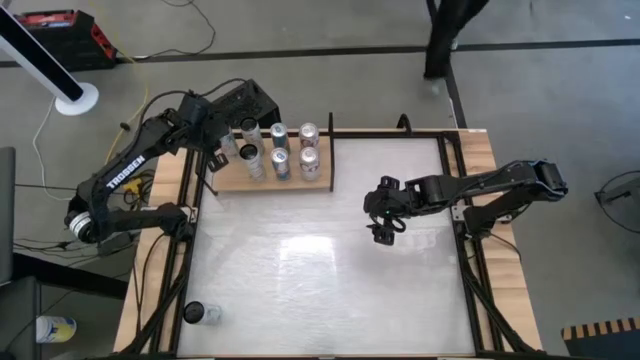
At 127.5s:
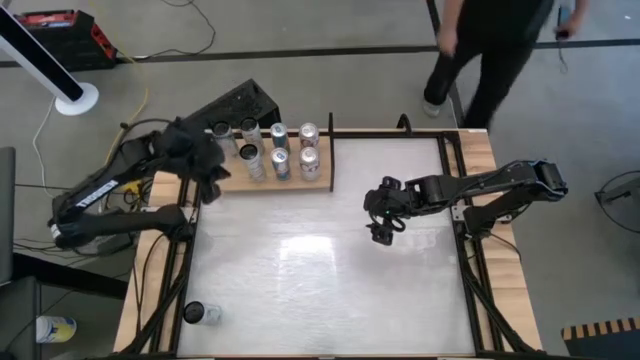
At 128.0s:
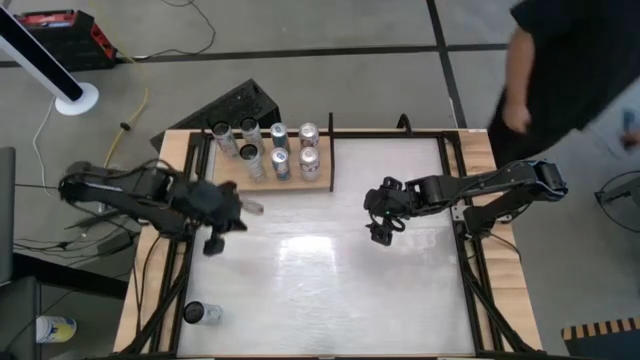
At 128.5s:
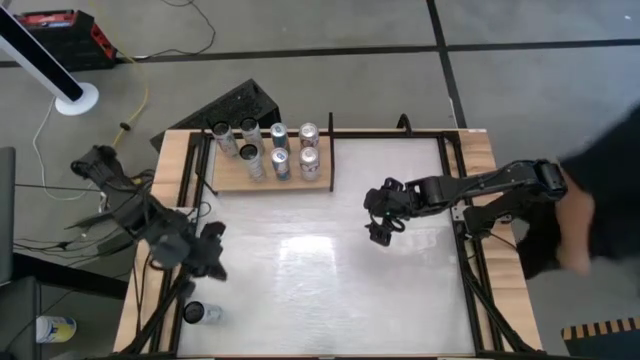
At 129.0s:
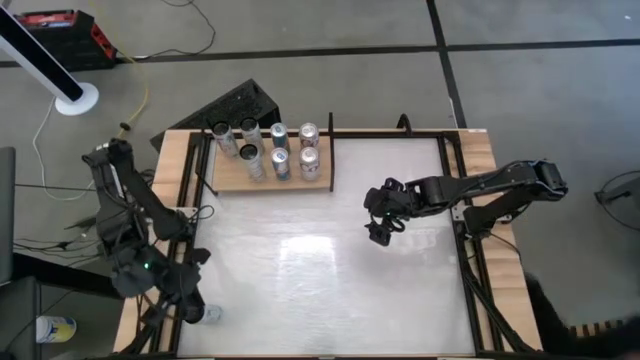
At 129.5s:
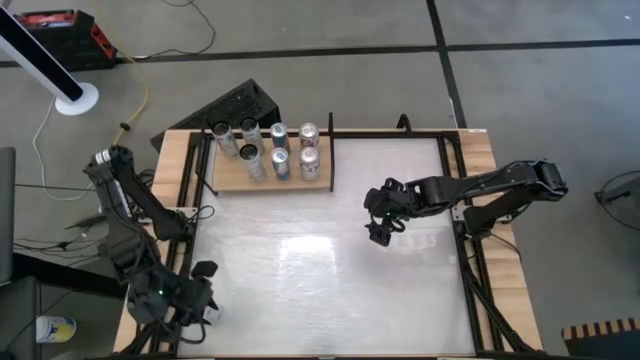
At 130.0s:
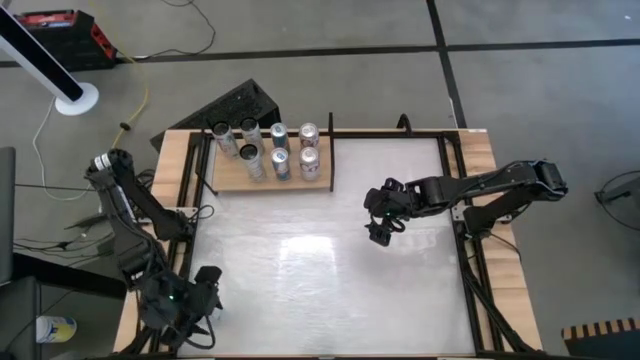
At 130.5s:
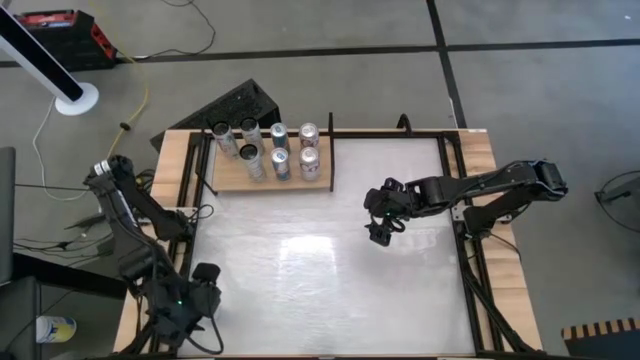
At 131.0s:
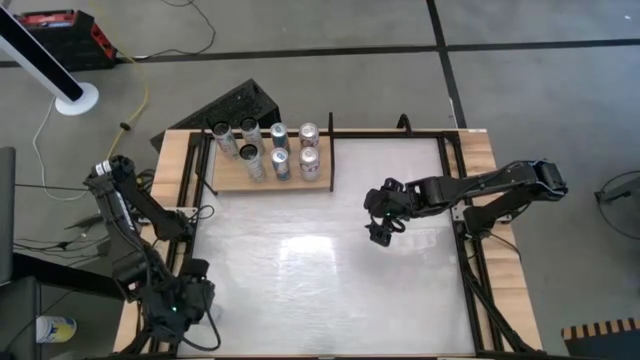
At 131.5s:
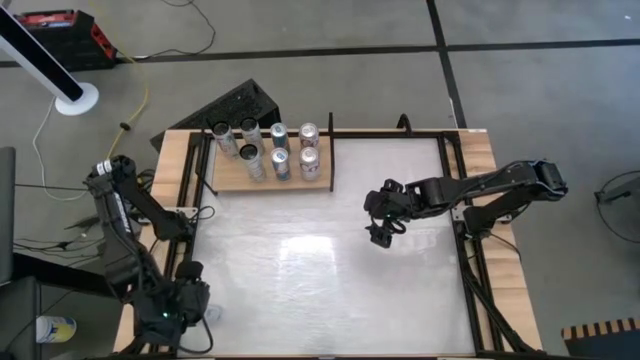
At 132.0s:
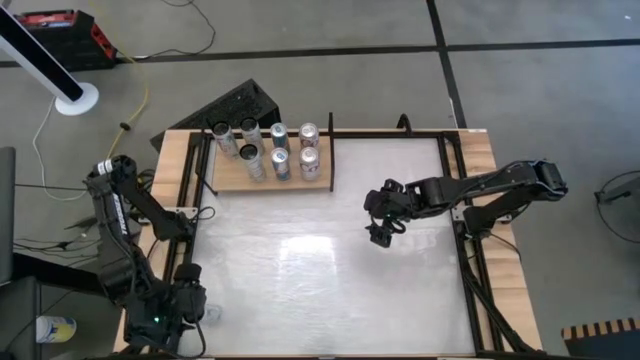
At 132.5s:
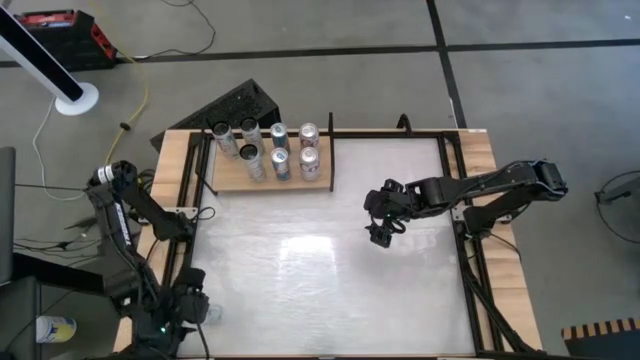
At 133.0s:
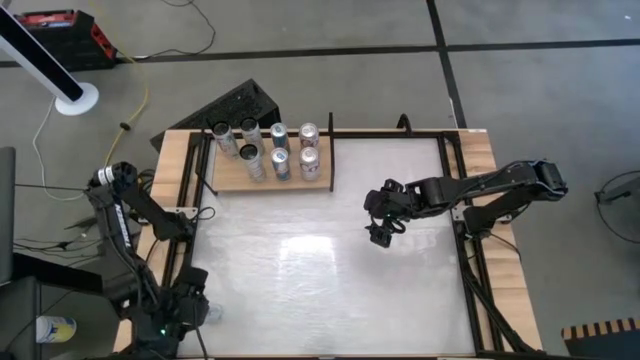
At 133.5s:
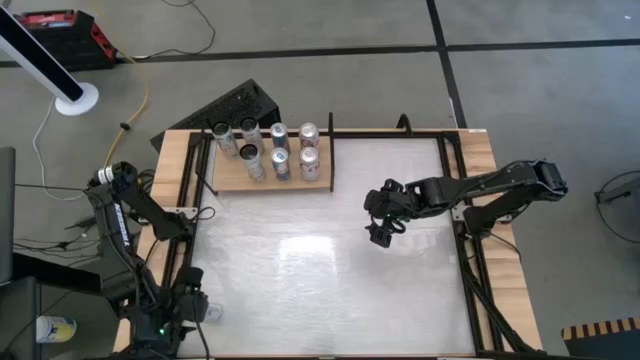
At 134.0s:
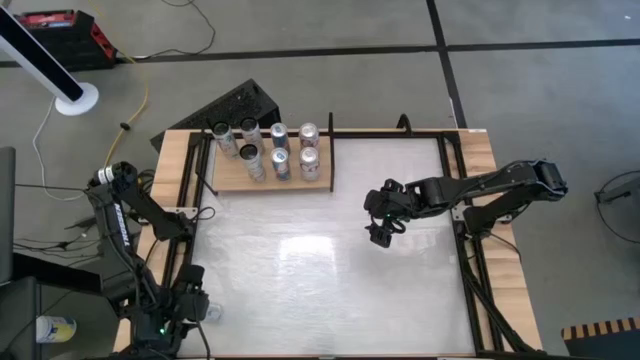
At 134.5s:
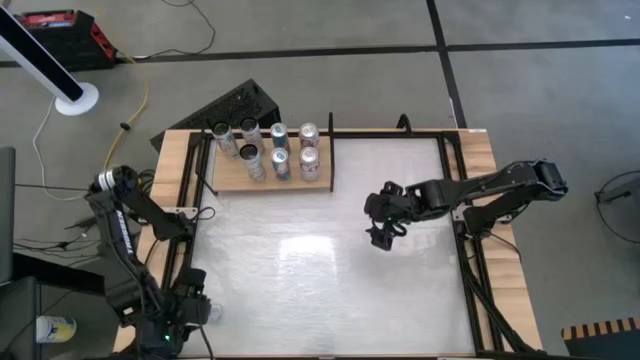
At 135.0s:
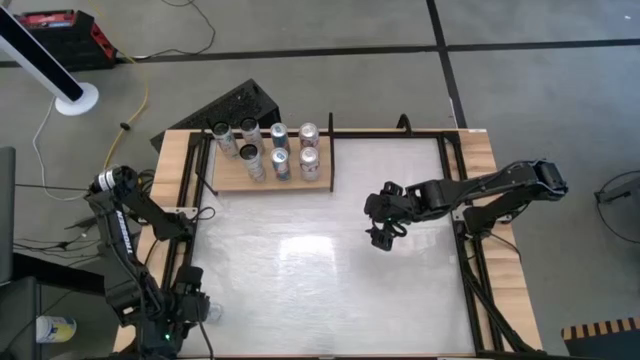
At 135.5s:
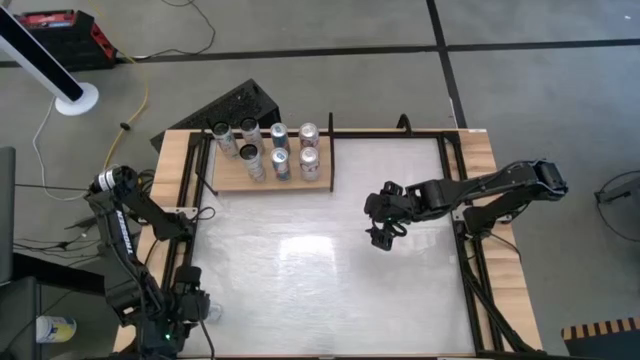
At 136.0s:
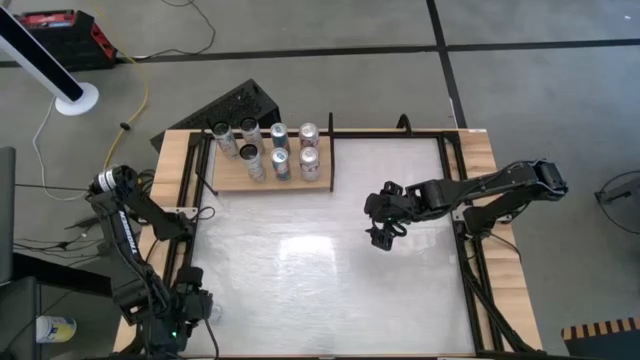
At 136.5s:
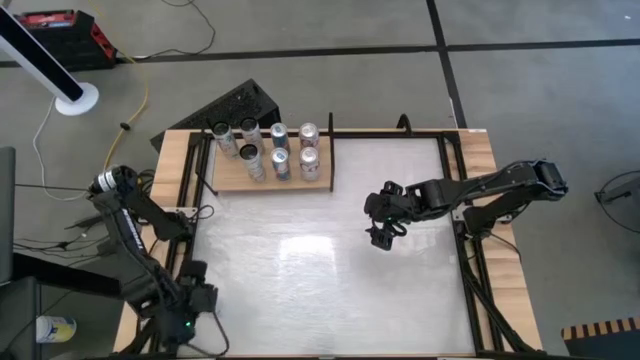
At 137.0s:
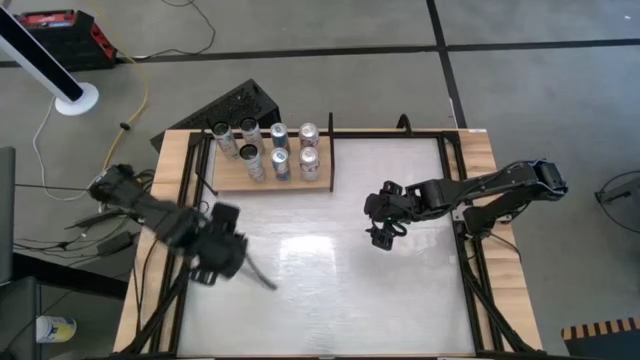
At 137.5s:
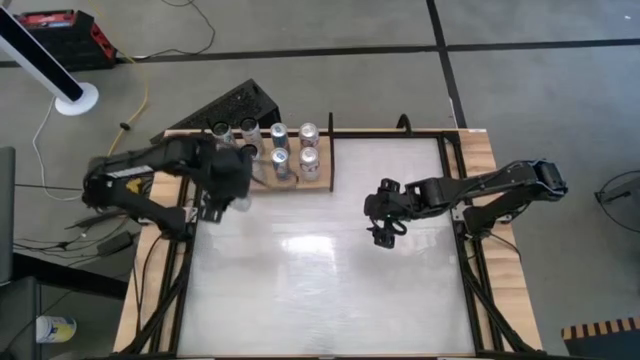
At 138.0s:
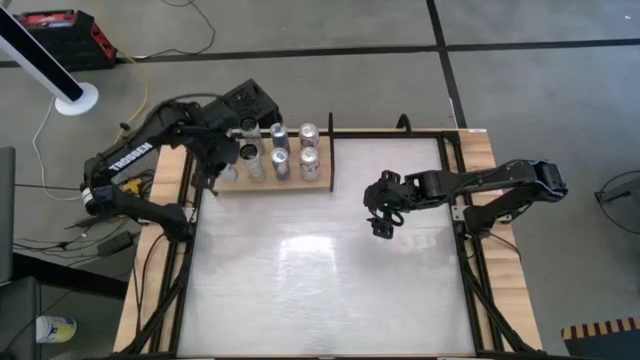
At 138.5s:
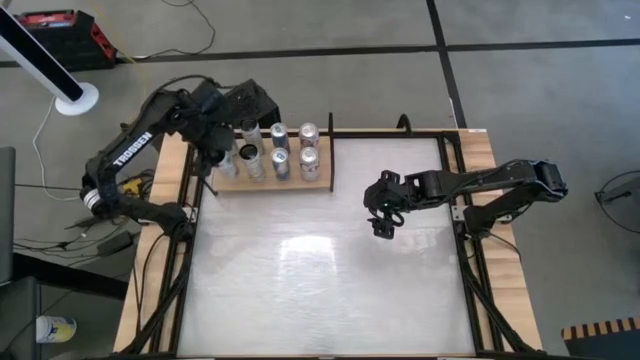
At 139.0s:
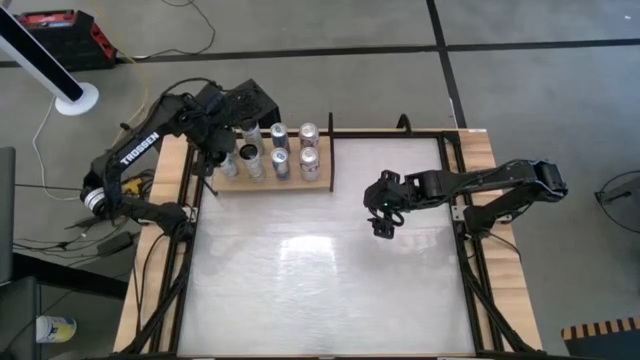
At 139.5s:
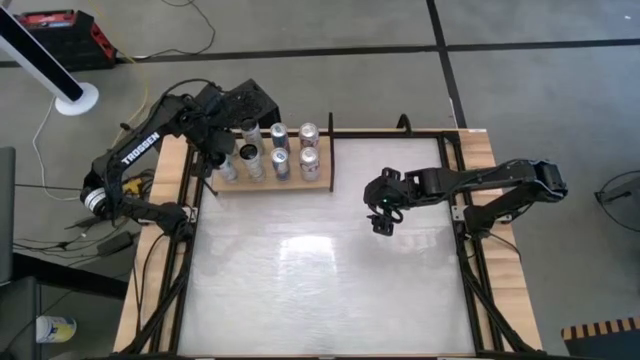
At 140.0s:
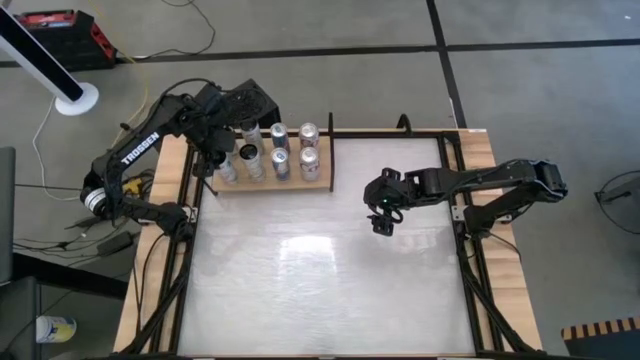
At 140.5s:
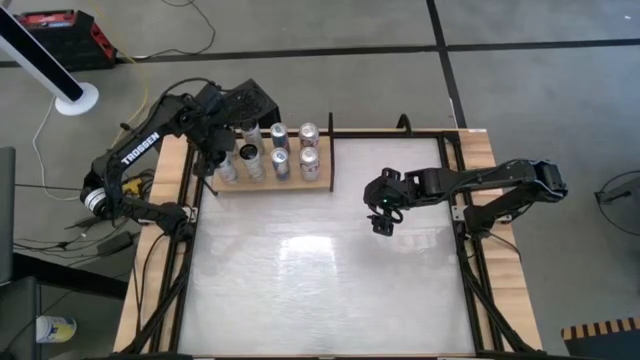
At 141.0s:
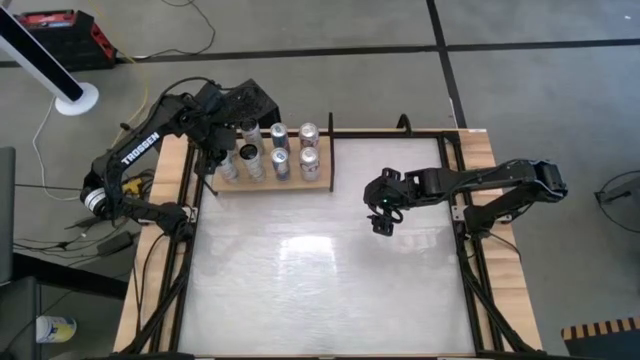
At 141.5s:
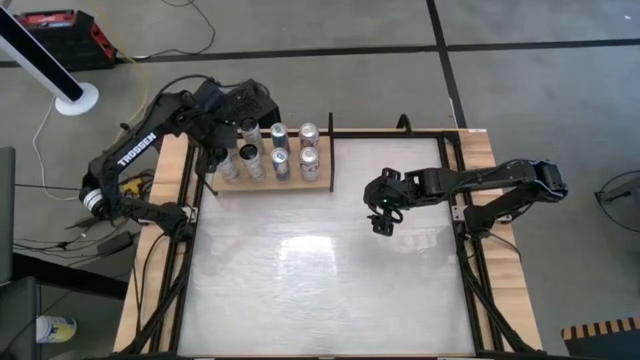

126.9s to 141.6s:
Task: Place canned beverage on shelf
Put the red soda can on the shelf

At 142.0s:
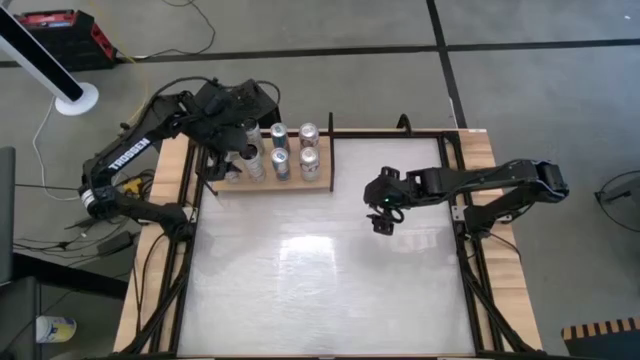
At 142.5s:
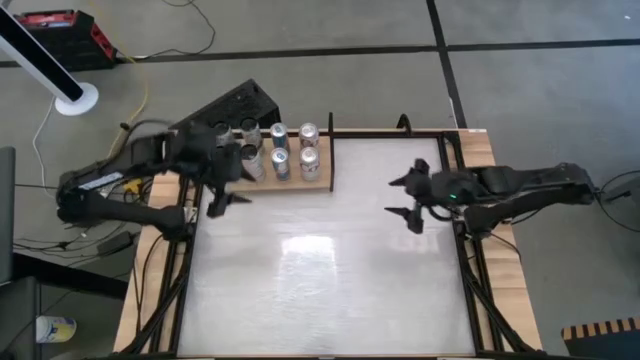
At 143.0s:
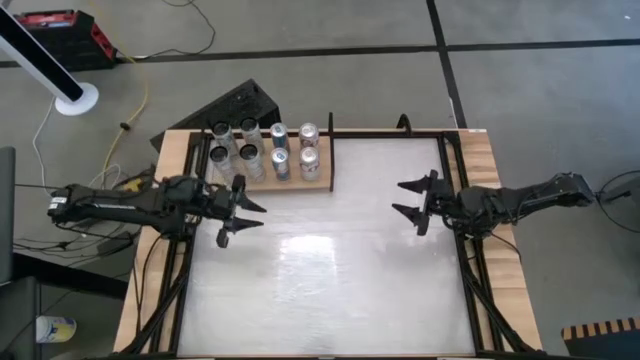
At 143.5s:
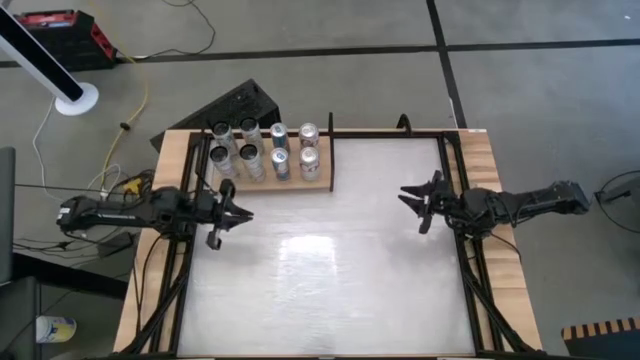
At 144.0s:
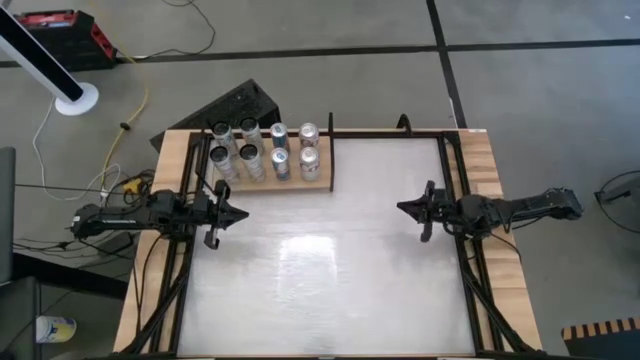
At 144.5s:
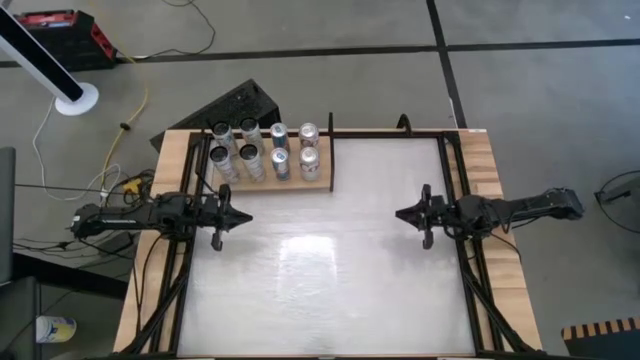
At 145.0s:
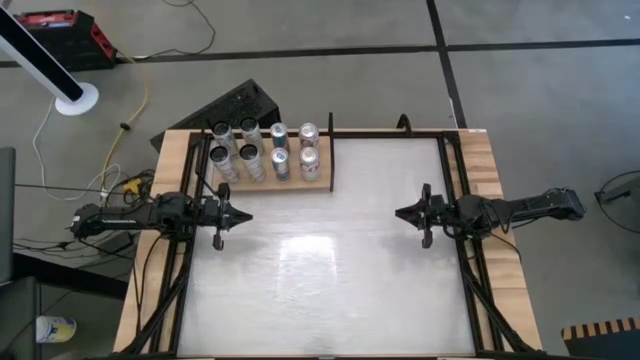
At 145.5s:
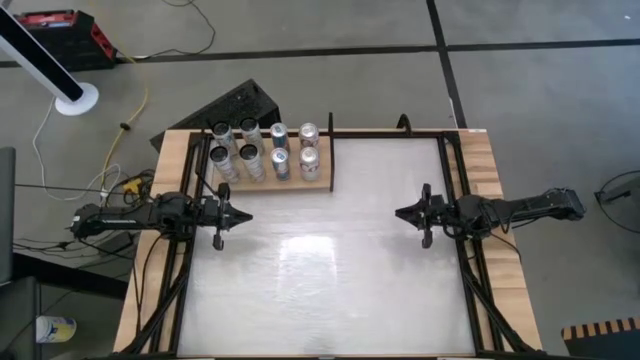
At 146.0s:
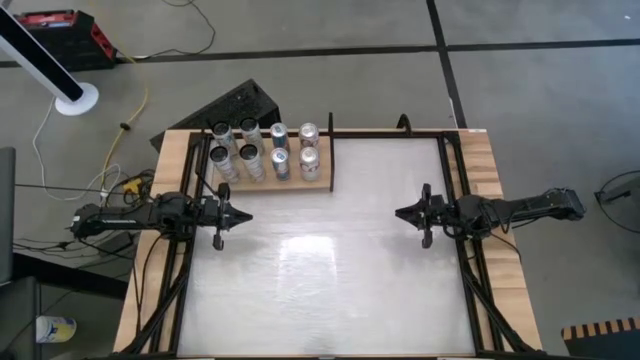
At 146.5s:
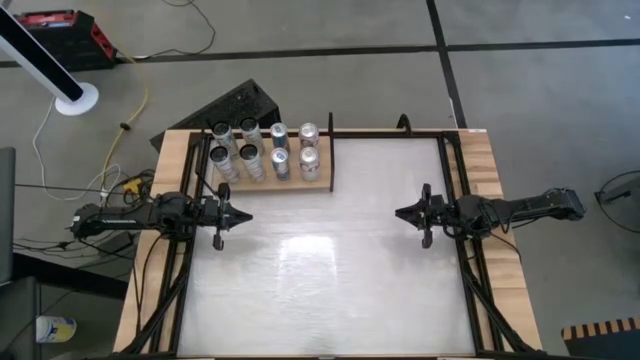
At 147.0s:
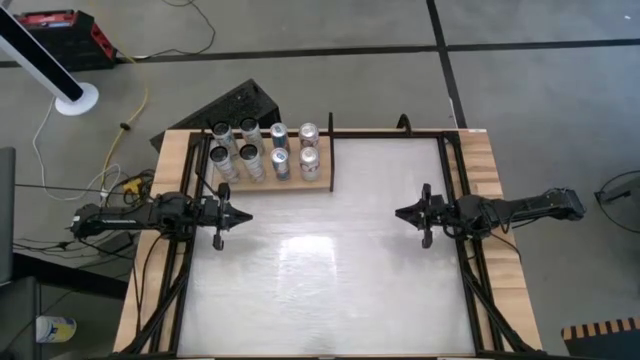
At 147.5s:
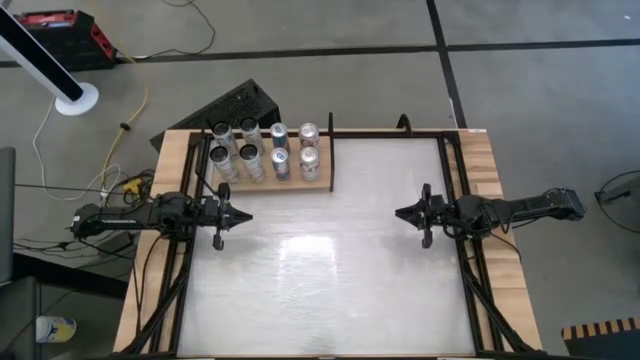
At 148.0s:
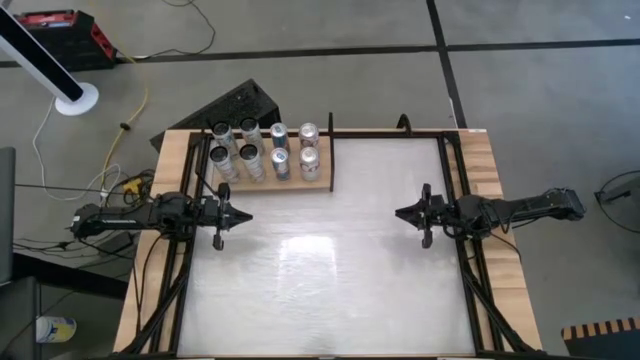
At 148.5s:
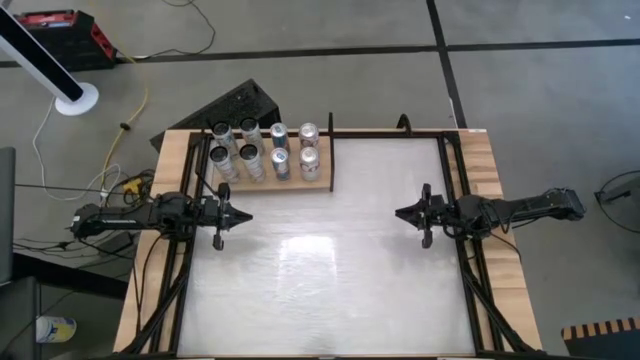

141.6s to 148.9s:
Return to Home Position
